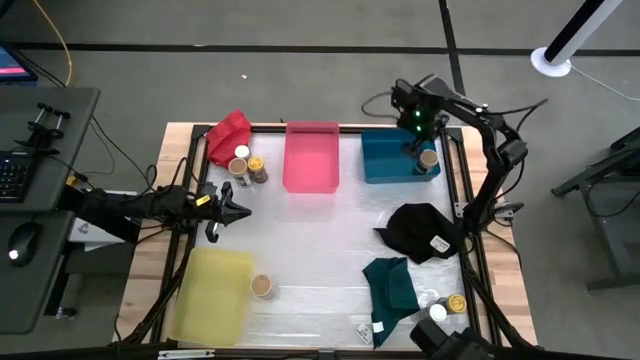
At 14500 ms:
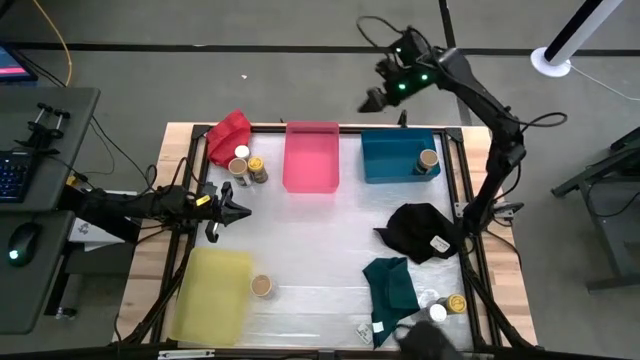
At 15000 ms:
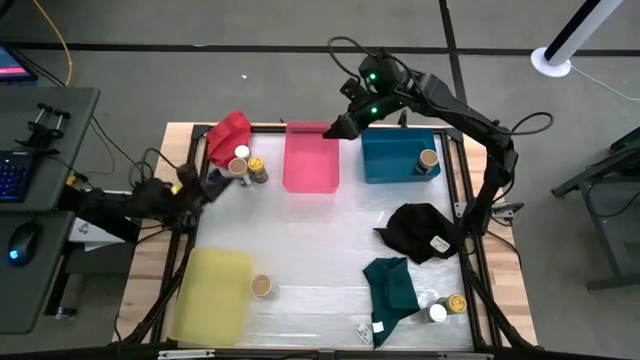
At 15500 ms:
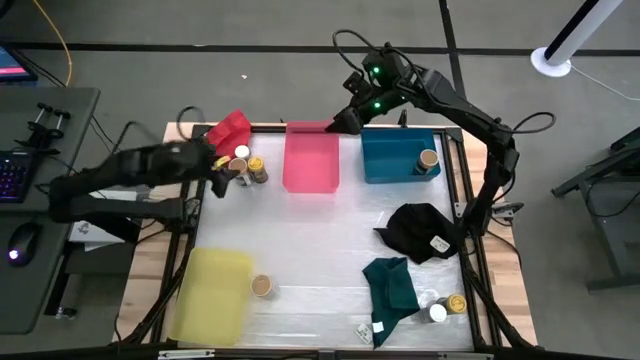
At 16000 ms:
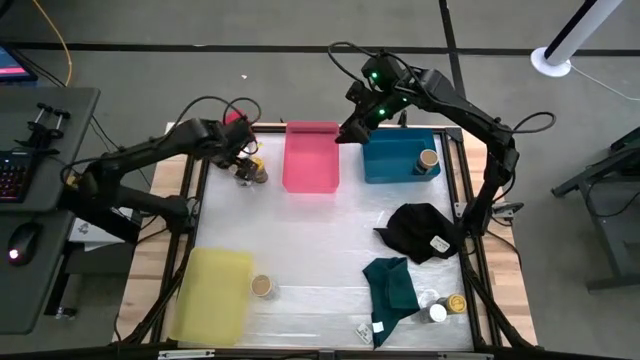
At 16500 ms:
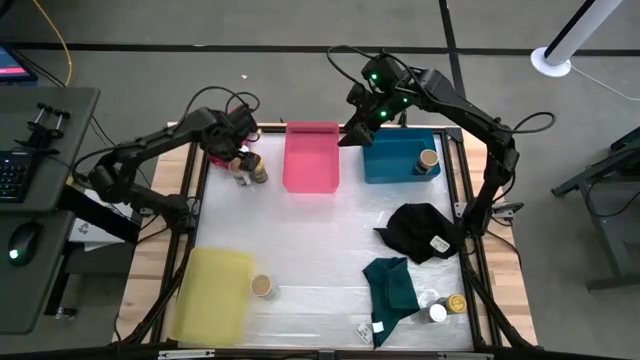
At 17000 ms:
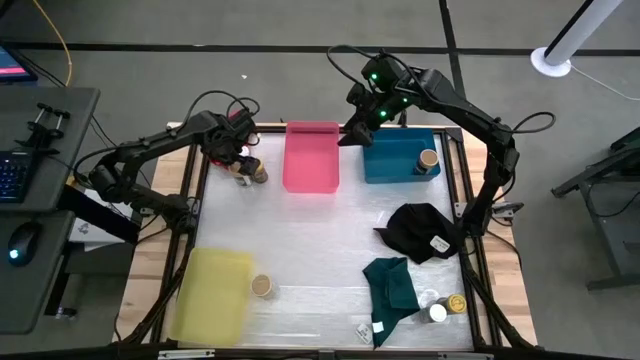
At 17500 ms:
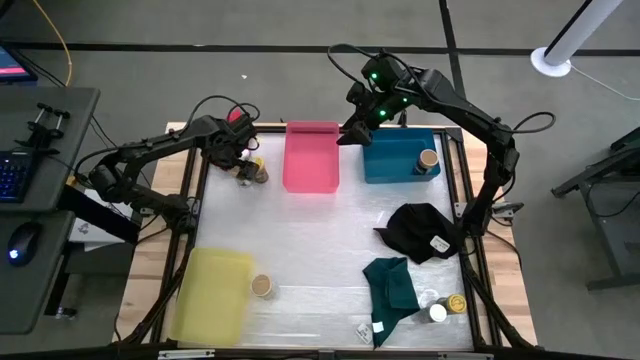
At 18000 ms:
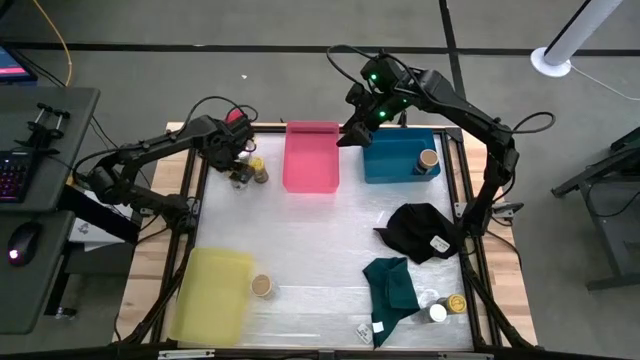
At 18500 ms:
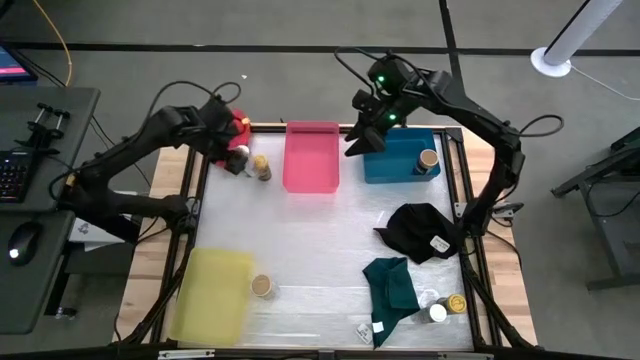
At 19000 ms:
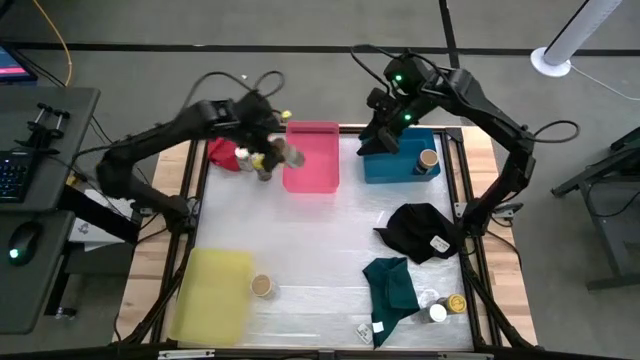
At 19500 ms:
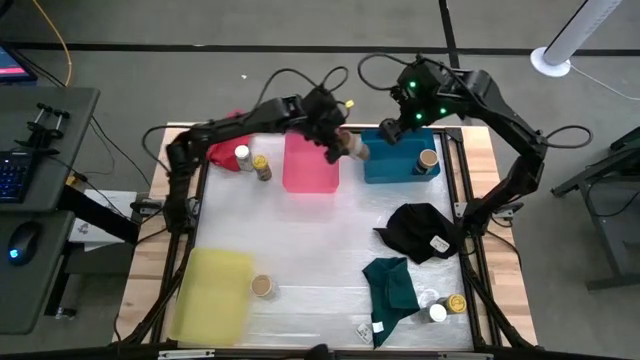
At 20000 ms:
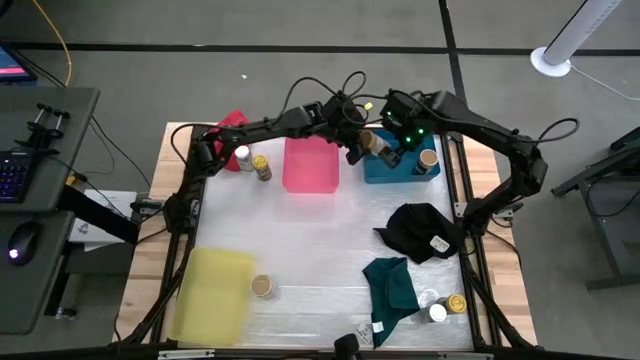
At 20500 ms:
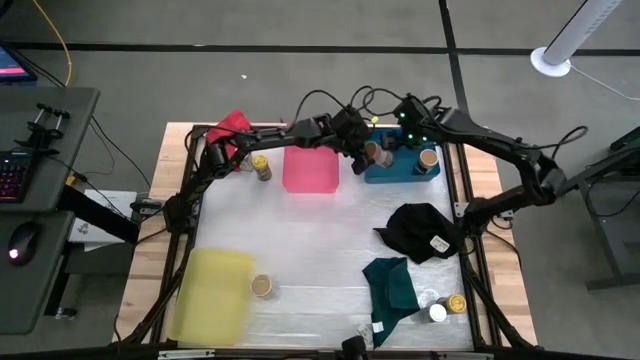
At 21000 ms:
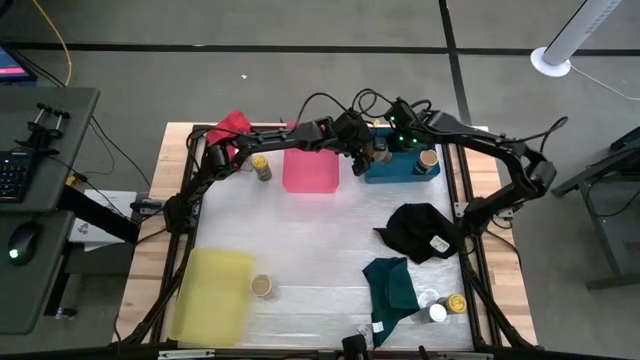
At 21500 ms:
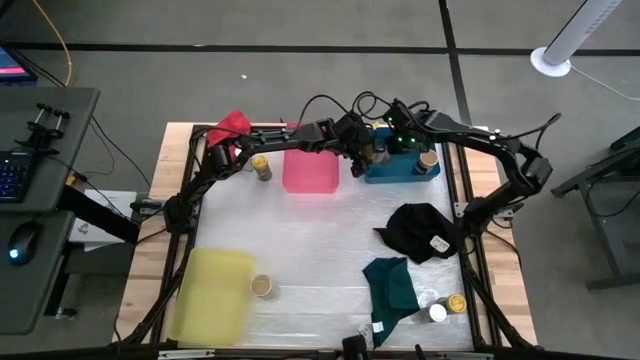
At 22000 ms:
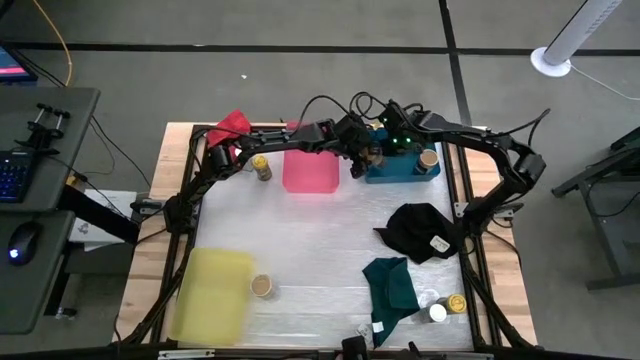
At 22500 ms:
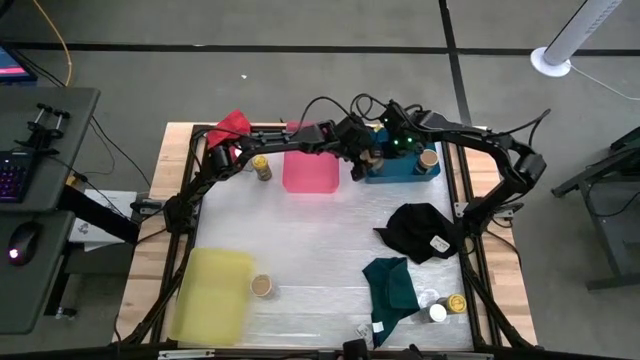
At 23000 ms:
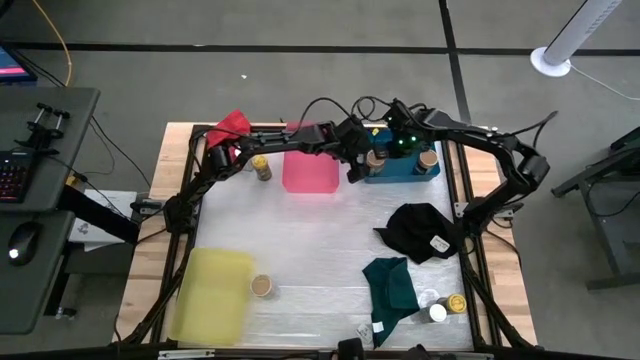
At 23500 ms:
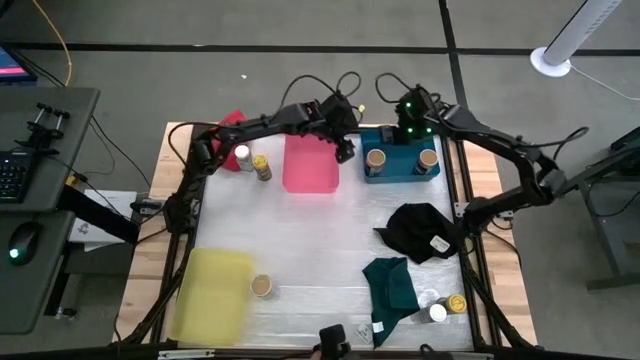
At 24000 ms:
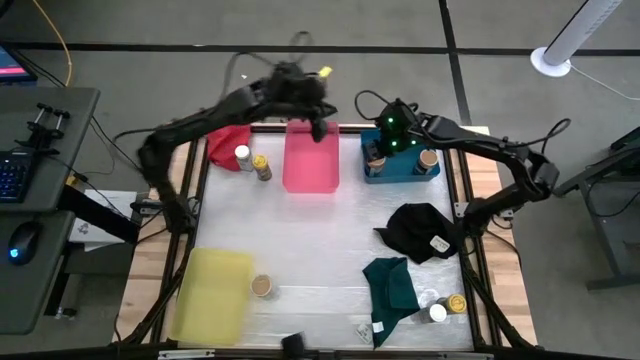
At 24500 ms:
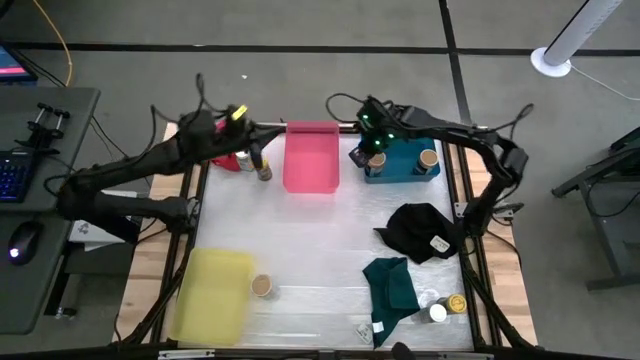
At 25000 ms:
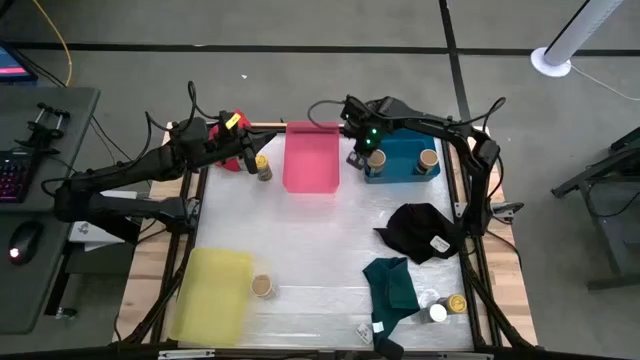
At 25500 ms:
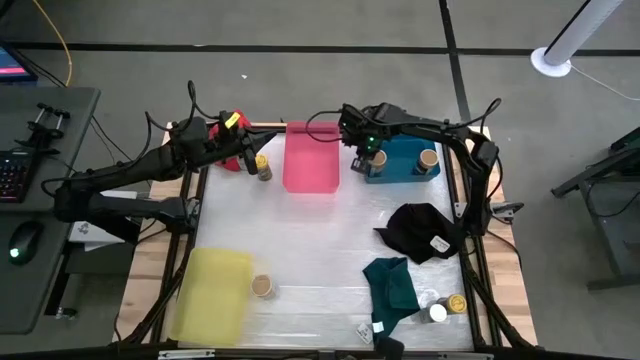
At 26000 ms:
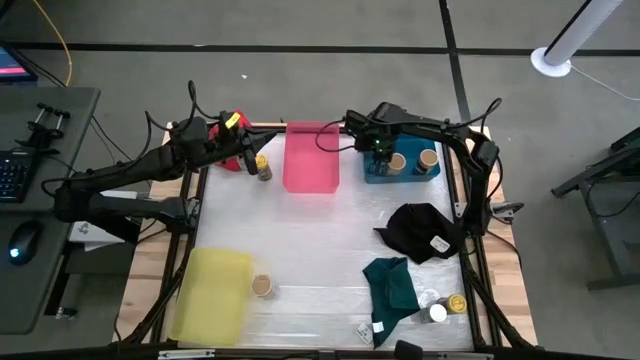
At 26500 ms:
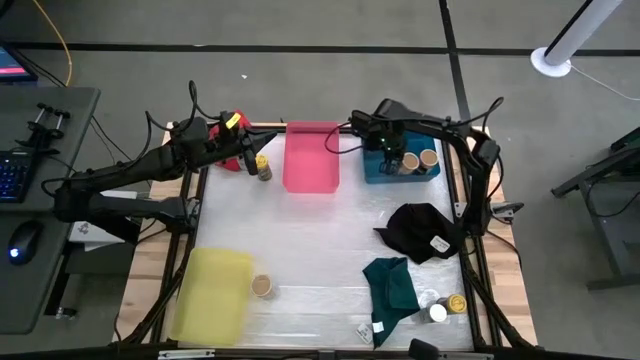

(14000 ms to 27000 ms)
Task: Sort spices by type
Put the top gold seasoning bottle into the blue bin

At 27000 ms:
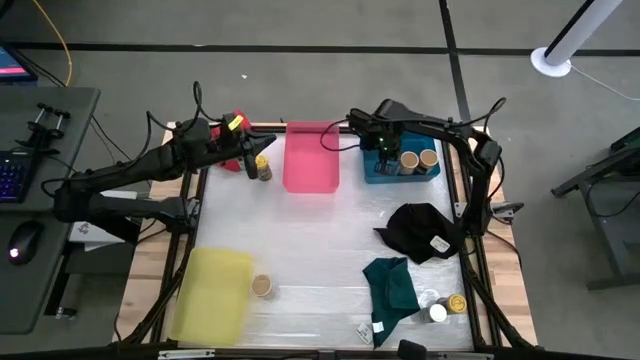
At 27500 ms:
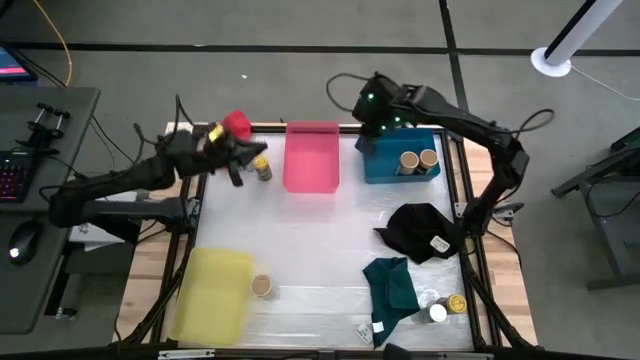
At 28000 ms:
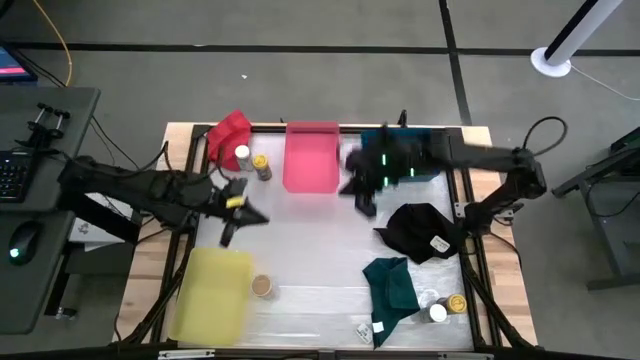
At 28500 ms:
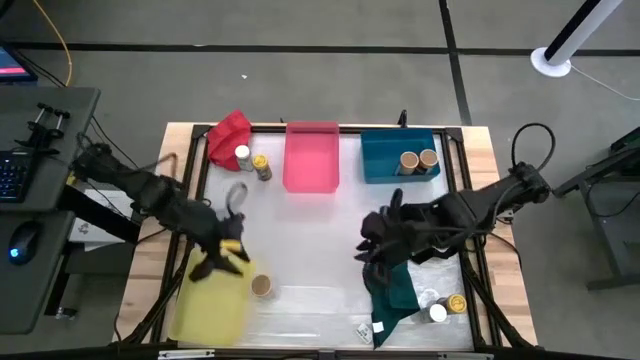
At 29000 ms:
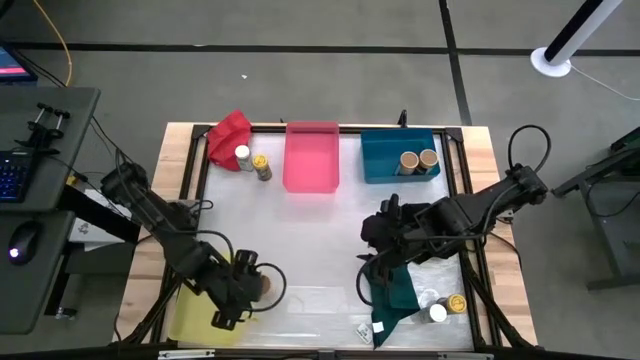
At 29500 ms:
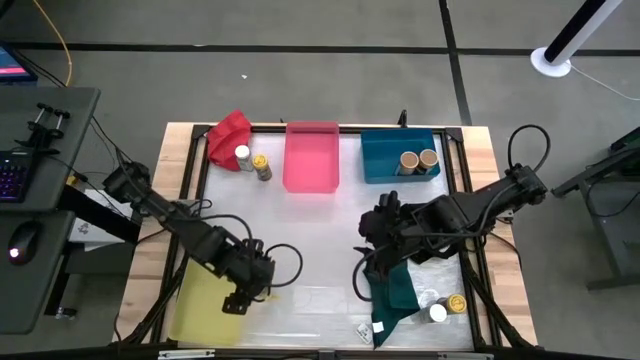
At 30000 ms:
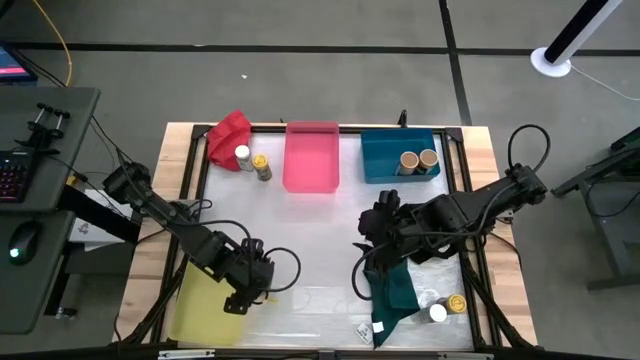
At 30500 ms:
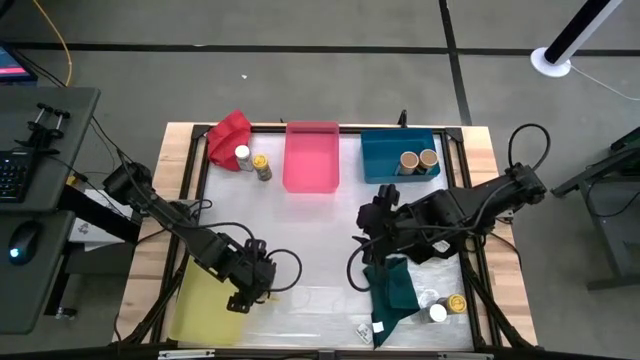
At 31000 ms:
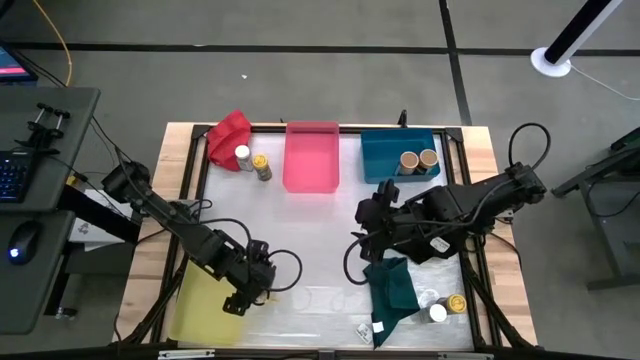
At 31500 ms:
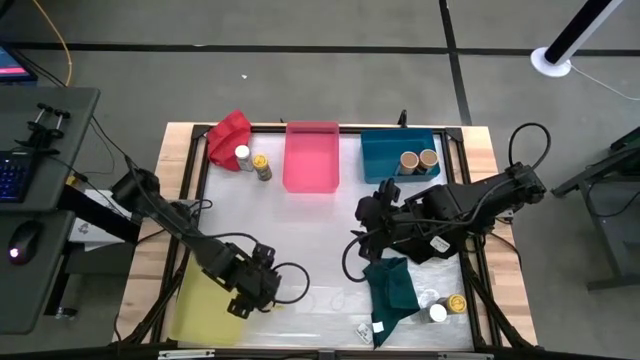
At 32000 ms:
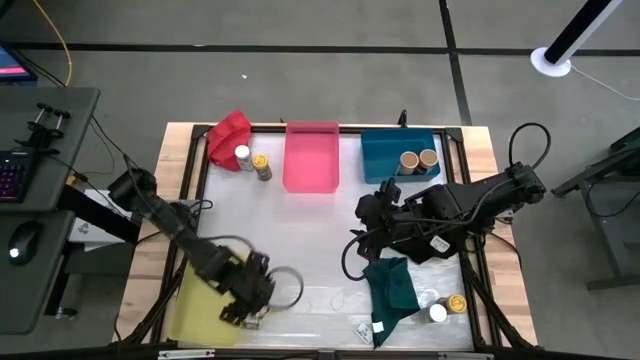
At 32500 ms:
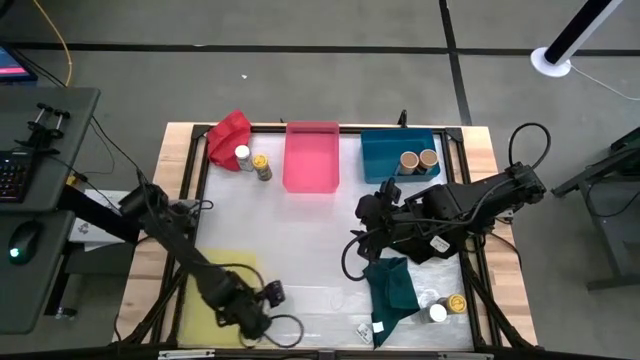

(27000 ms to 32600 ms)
Put the gold seasoning bottle into the blue bin

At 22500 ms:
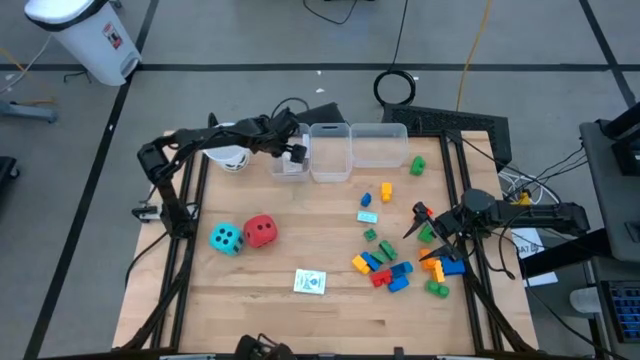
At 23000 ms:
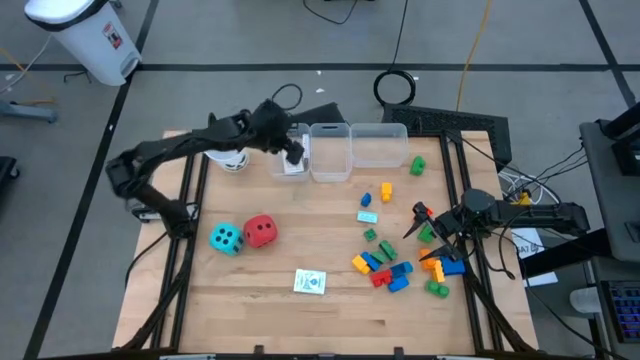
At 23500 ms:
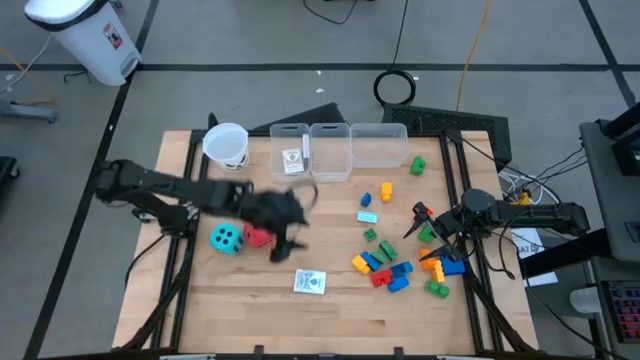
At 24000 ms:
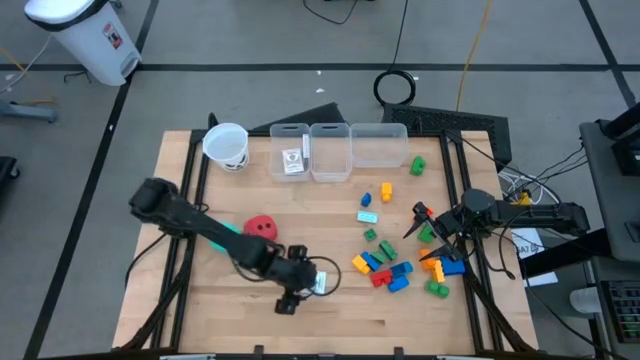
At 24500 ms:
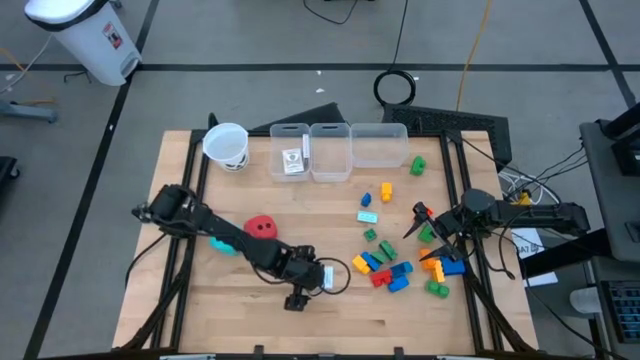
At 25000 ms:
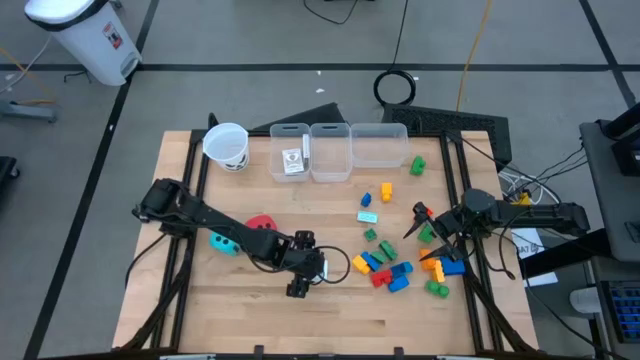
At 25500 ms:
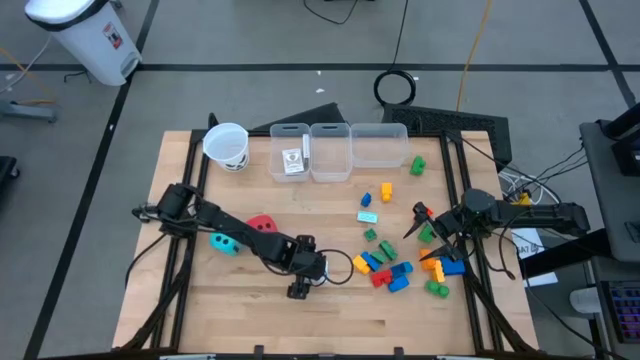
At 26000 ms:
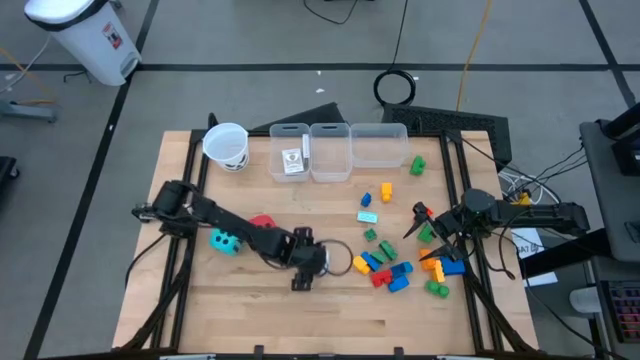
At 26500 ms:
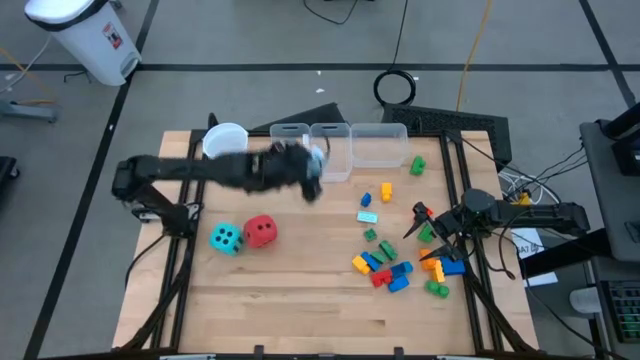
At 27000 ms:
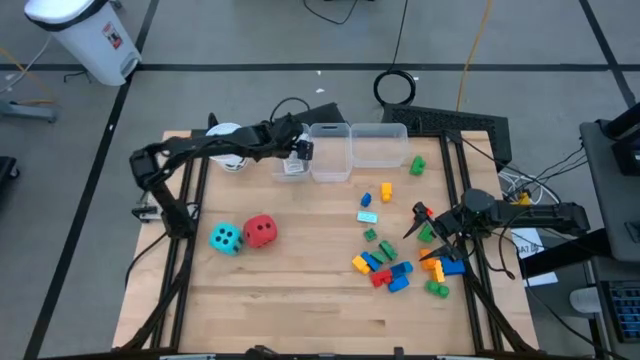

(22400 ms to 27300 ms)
Task: Pick & Place Toys
Put the light blue deck of cards into the left transparent bin
